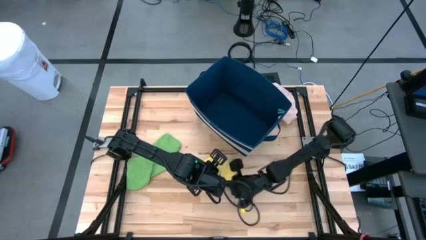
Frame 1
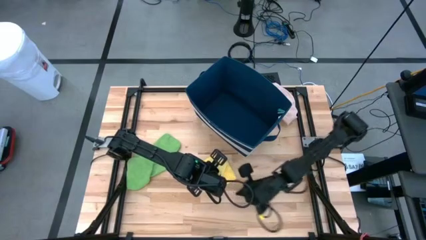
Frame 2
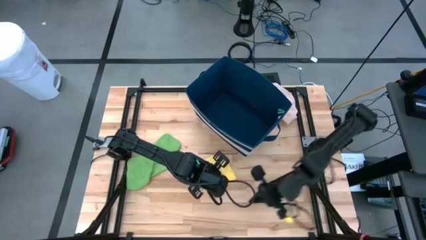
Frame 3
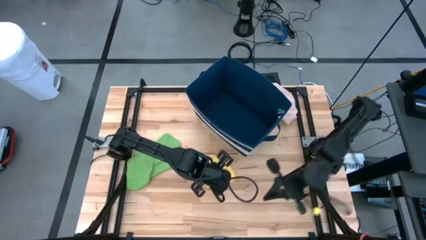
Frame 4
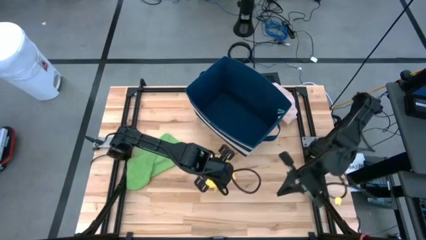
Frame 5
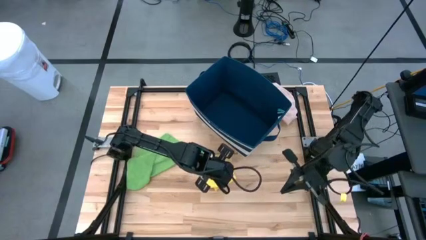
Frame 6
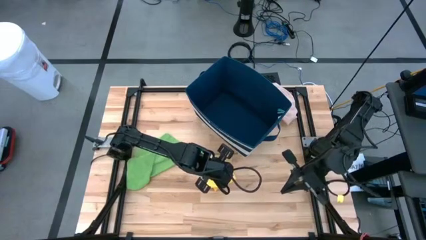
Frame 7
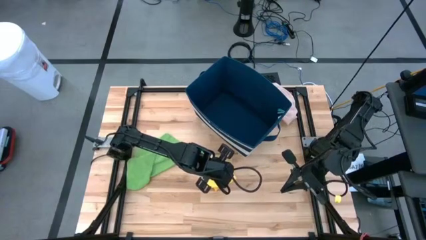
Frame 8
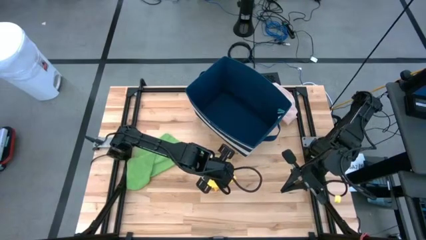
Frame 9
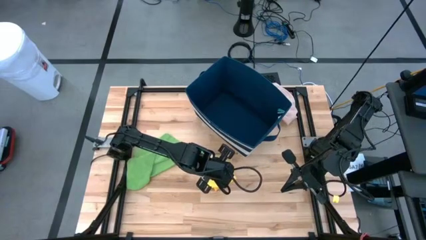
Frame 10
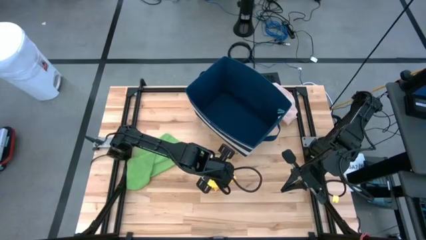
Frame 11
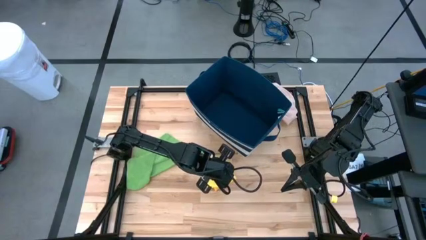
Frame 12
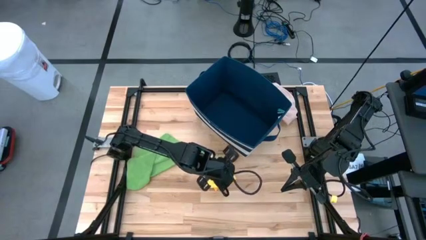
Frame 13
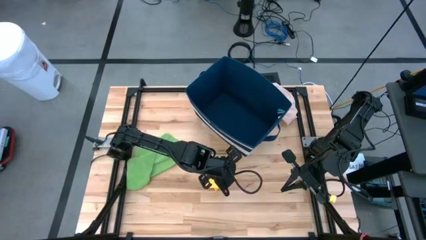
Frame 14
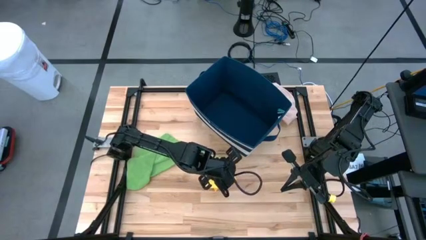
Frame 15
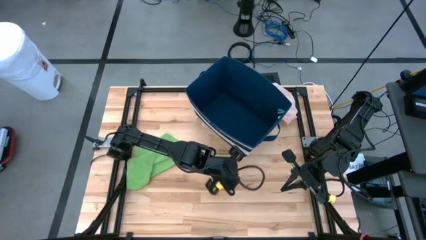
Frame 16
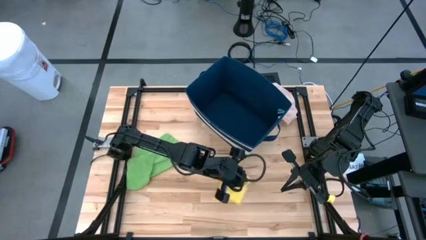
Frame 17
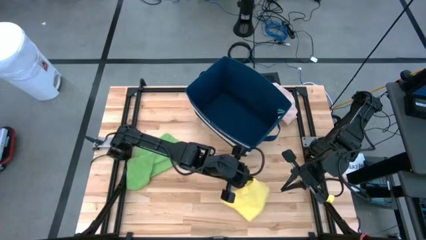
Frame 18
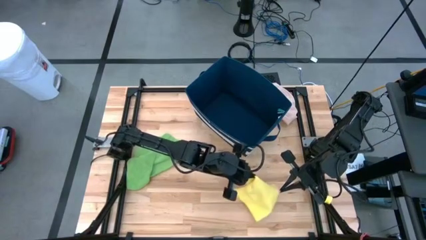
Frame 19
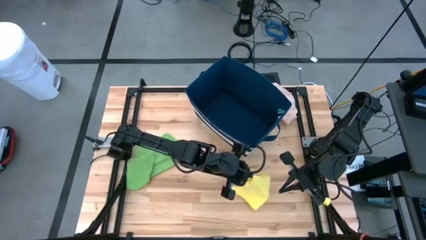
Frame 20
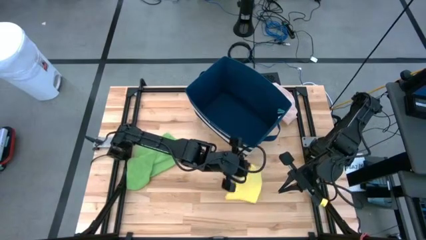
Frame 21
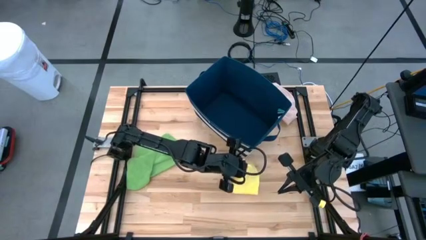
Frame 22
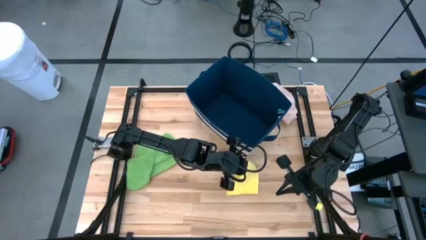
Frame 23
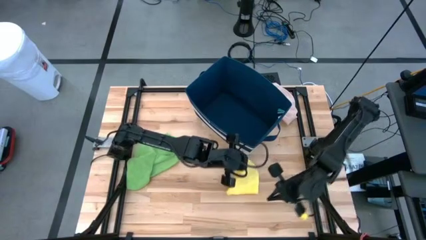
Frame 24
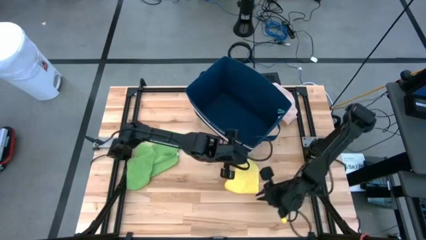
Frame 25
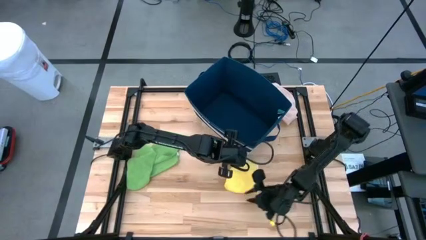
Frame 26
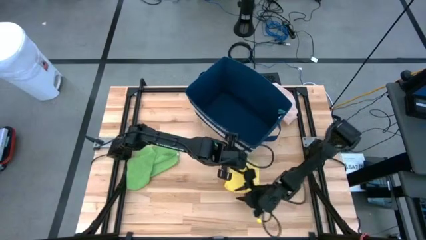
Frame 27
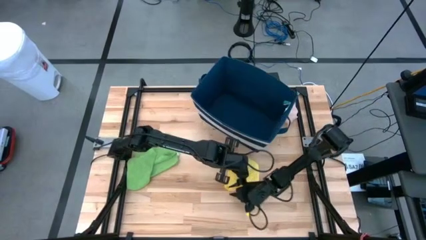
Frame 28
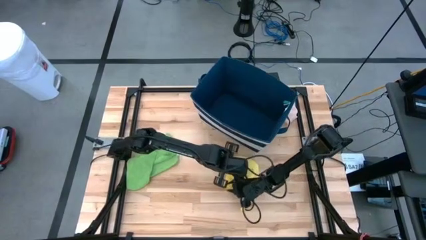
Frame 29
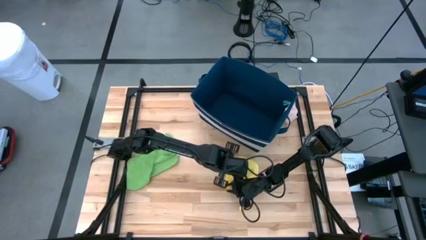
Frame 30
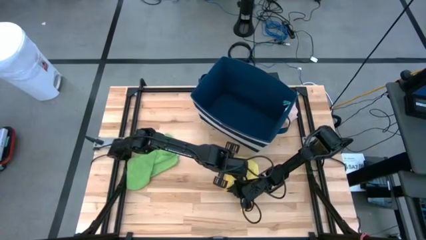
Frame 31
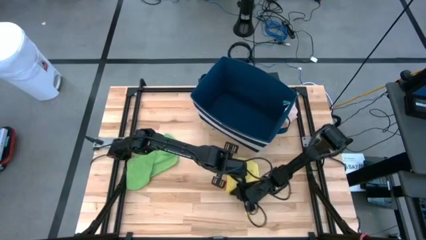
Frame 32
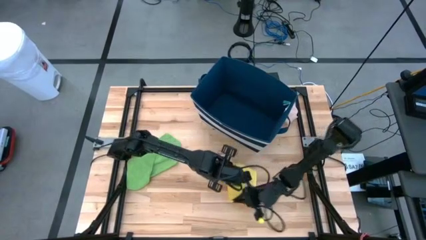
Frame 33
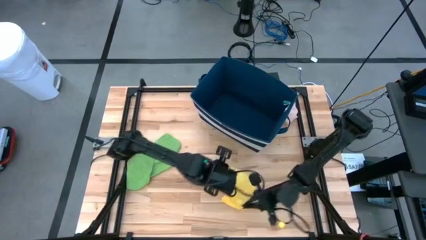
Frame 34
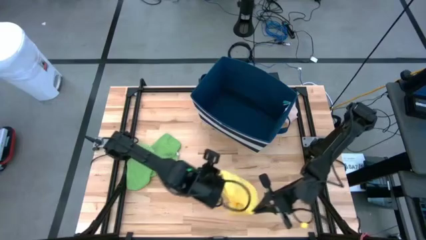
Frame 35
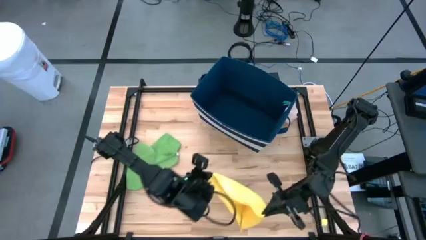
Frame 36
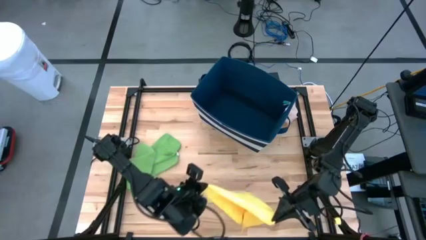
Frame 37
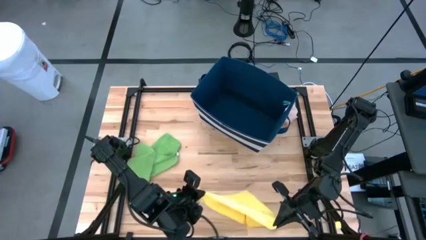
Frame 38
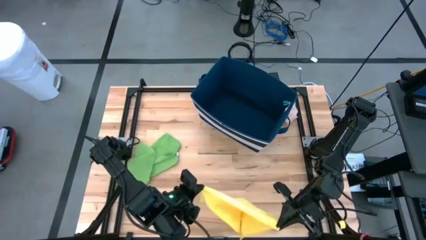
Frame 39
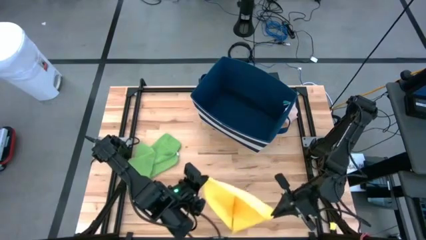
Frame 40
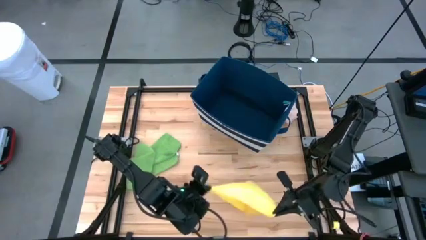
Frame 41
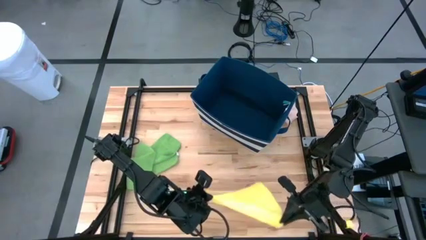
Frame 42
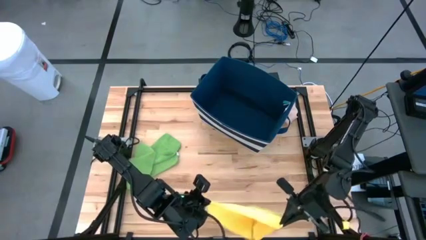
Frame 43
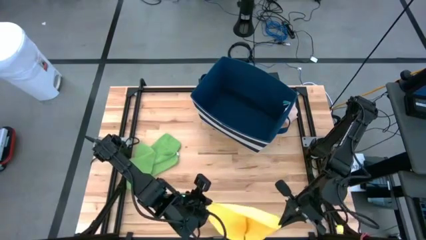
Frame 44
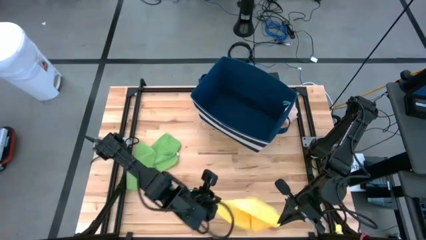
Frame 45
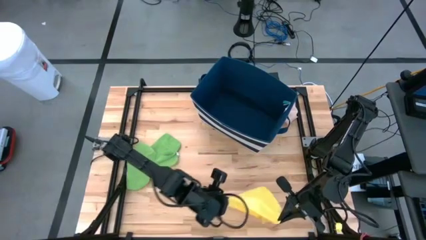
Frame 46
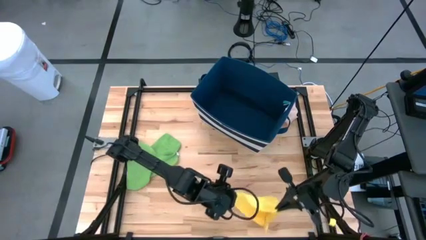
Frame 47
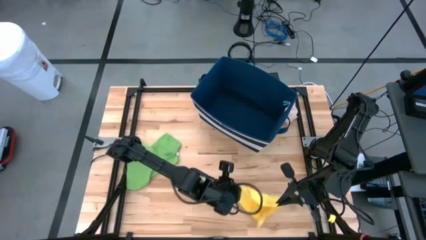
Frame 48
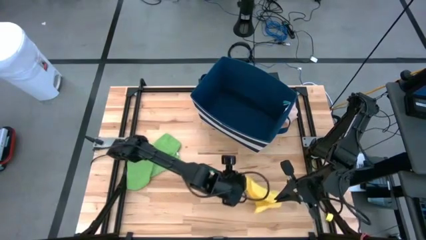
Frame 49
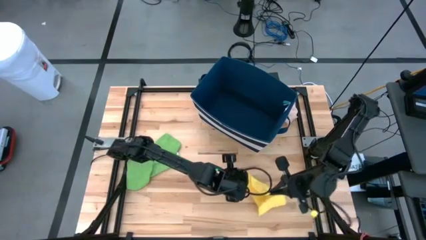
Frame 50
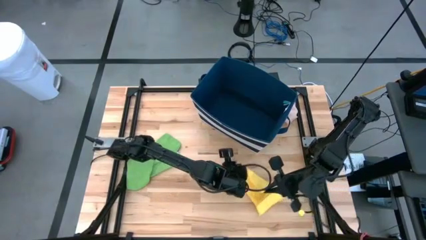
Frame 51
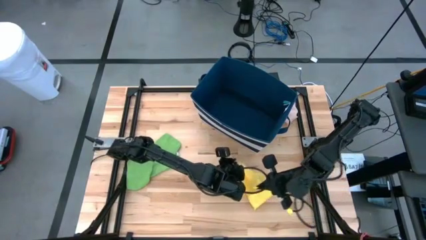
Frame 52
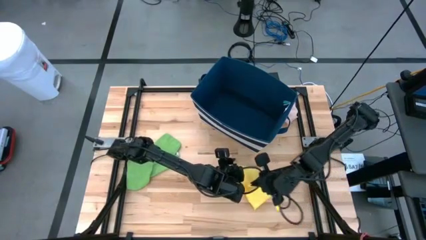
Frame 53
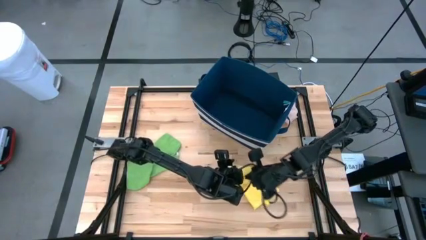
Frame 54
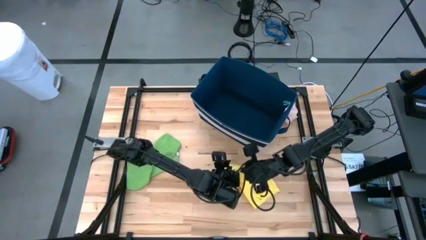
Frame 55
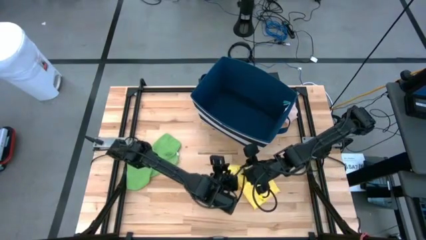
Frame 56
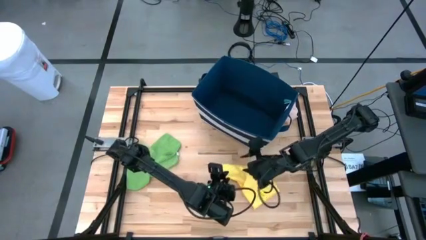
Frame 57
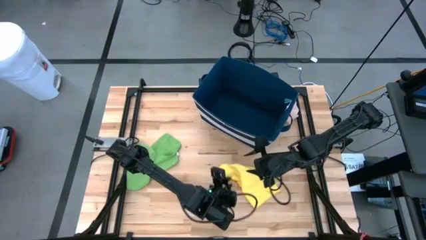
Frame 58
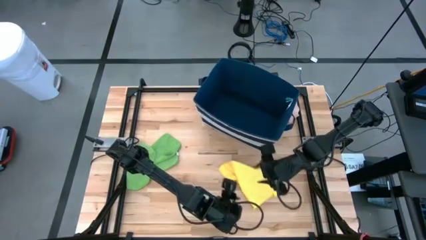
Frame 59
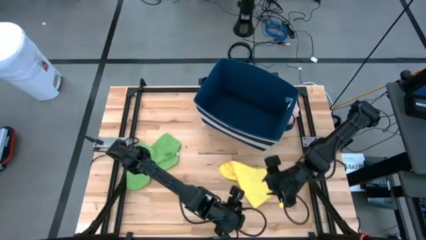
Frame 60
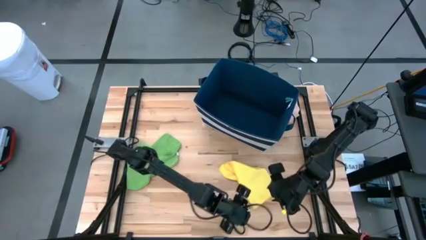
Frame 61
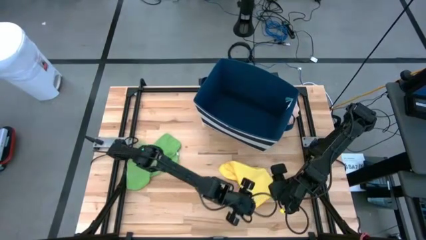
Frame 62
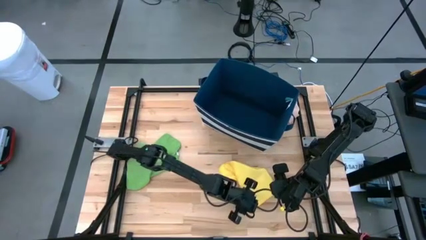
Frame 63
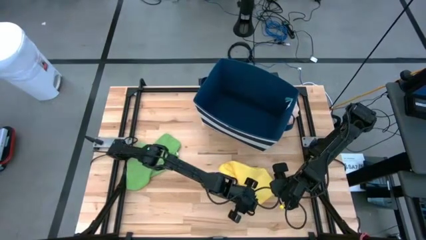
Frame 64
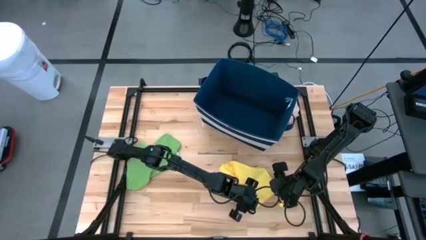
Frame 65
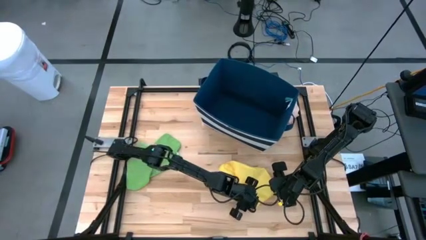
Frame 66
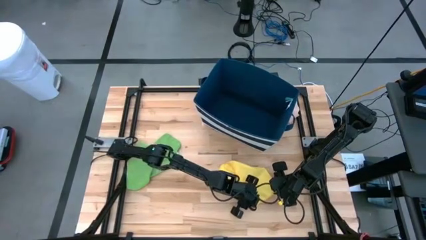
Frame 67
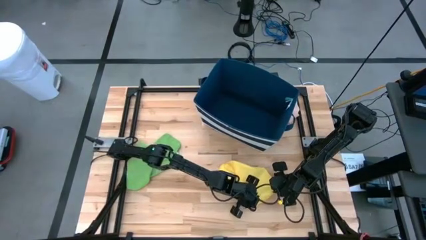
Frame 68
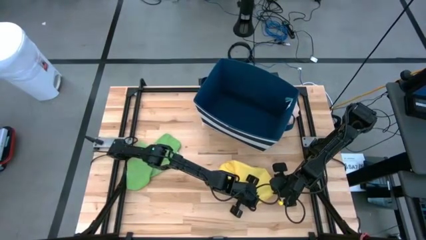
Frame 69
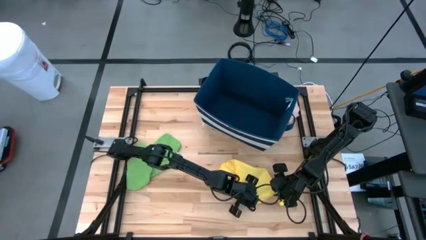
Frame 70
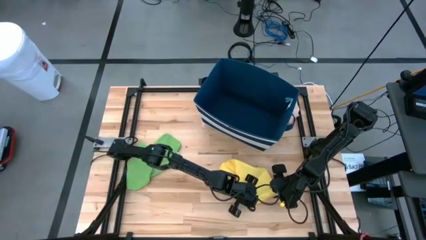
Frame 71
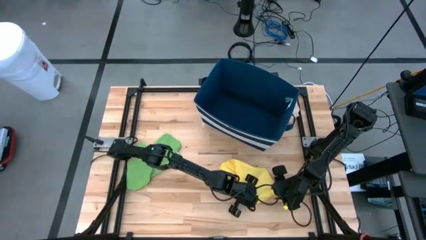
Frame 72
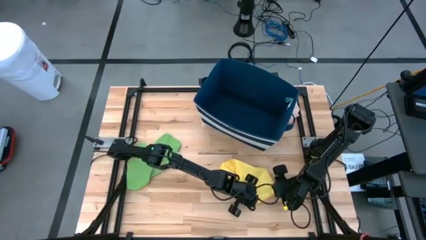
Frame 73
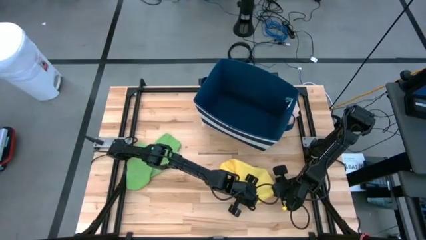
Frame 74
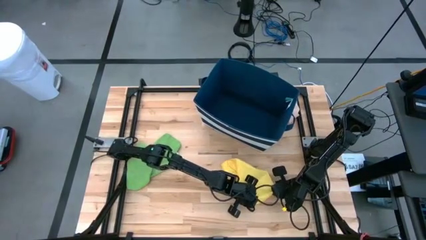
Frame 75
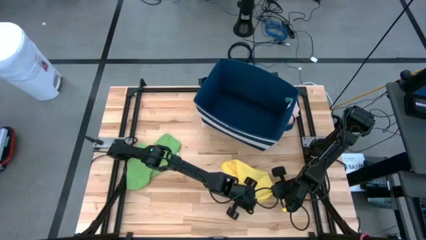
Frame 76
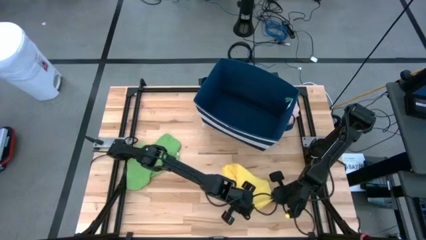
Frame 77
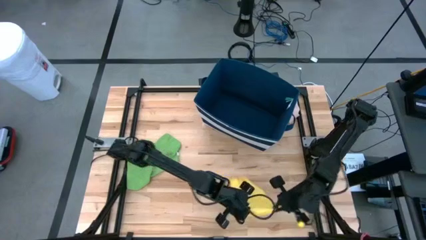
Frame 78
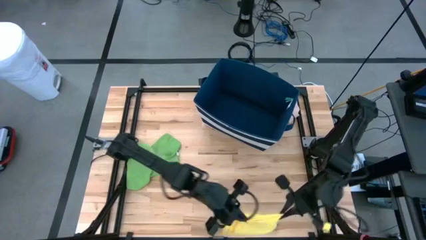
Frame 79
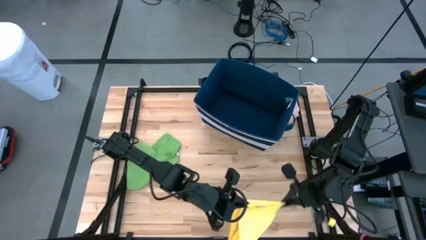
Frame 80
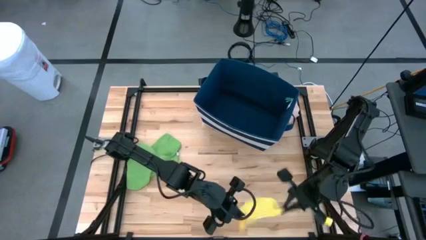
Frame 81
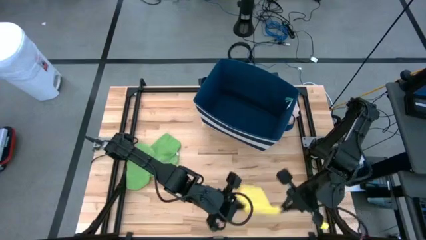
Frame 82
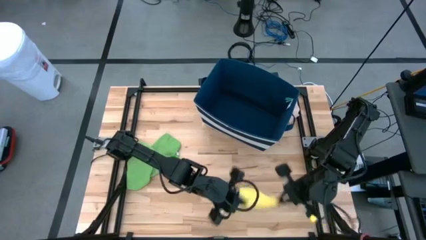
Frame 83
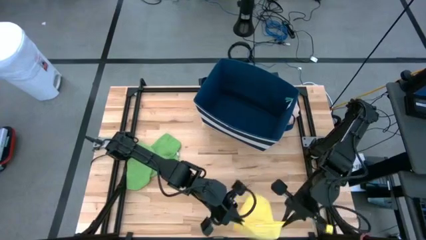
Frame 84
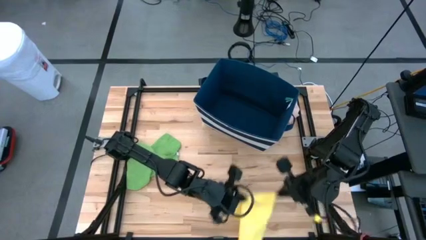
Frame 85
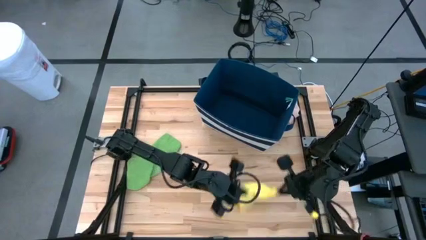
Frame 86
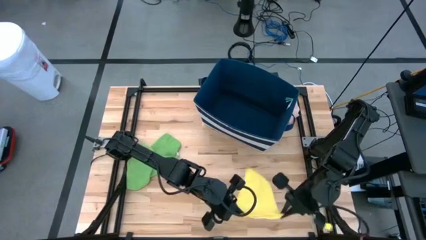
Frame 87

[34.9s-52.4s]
Task: Fold towel
Fold the yellow towel
